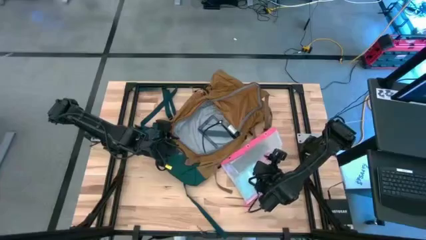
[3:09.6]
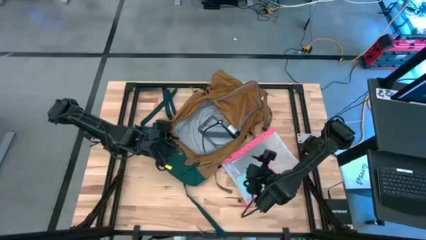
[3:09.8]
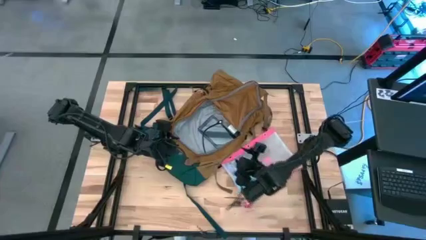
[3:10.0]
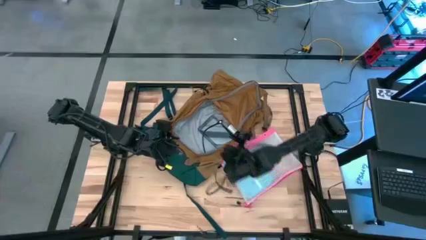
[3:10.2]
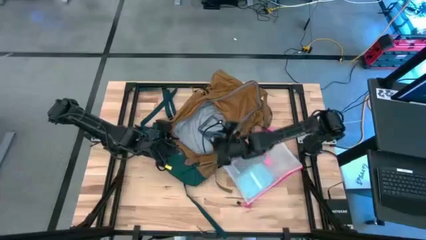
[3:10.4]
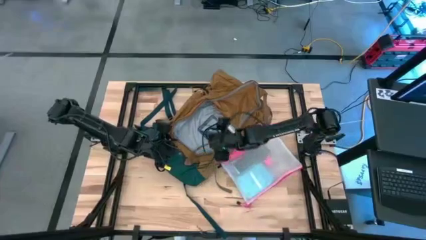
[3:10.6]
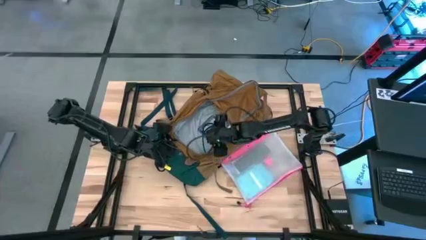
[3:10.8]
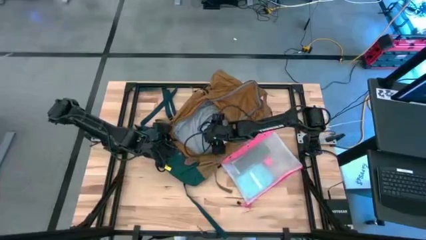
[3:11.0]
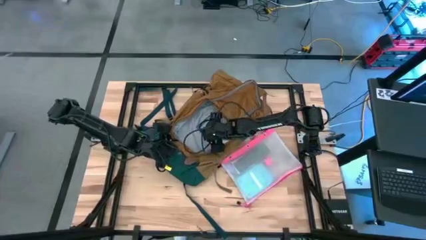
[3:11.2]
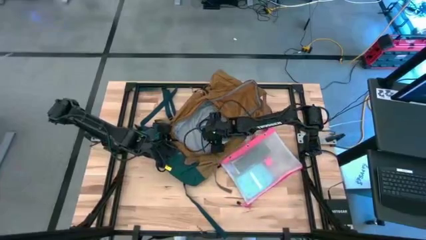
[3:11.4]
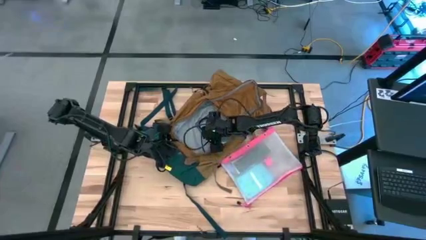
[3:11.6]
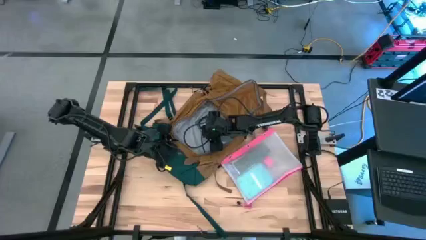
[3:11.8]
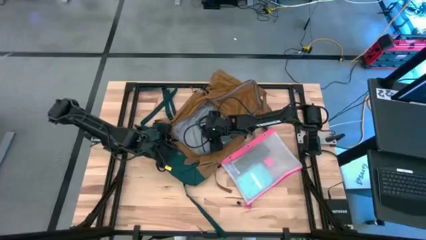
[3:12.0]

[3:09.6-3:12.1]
Task: Unpack backpack
Remove the black charger cable from the brown backpack

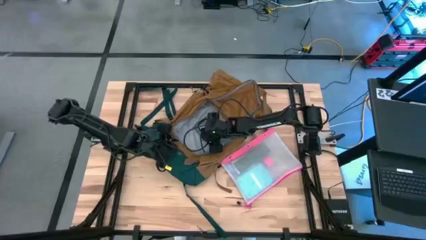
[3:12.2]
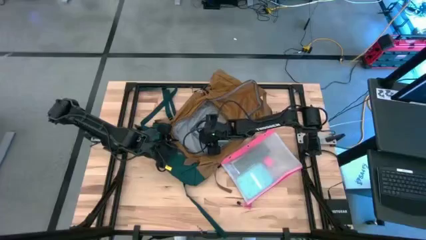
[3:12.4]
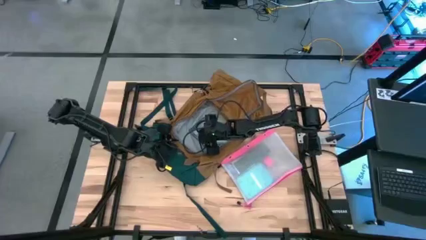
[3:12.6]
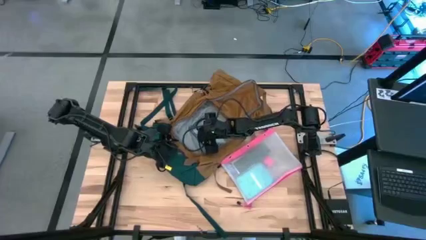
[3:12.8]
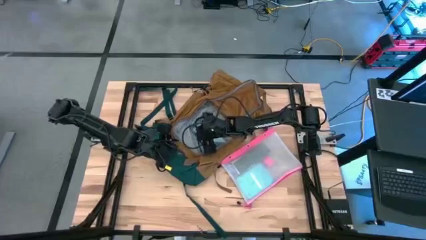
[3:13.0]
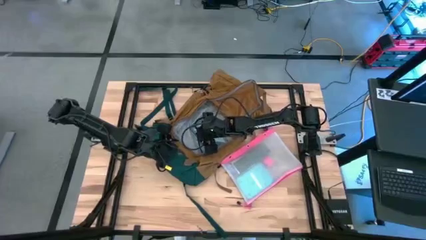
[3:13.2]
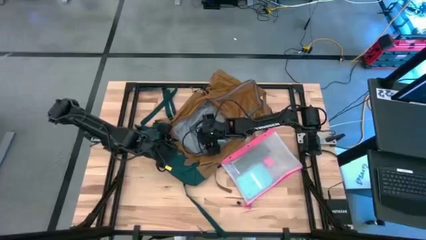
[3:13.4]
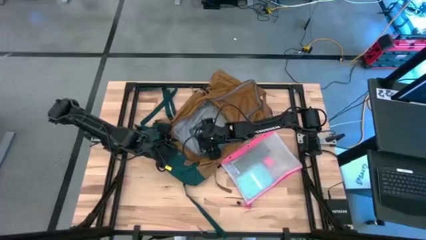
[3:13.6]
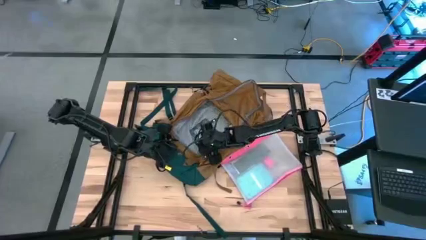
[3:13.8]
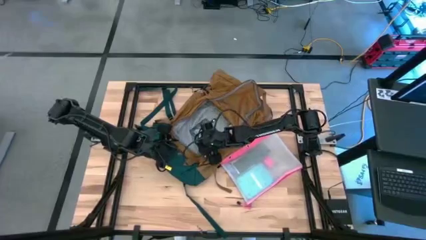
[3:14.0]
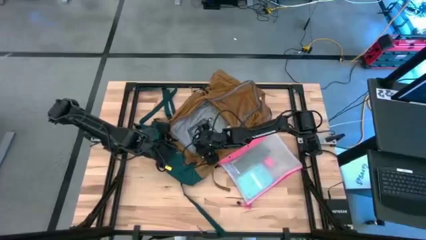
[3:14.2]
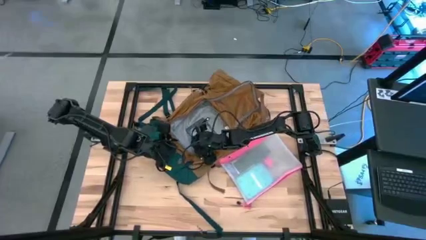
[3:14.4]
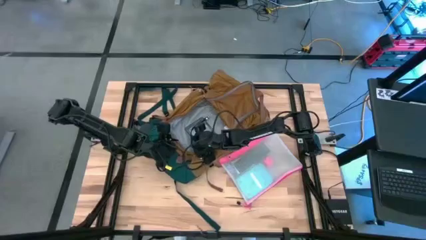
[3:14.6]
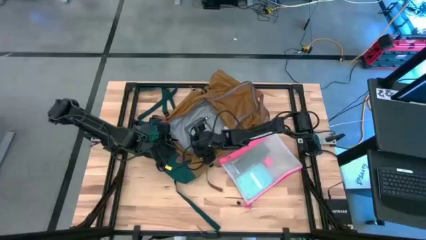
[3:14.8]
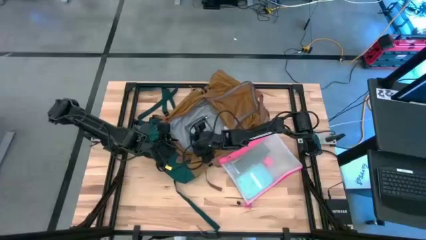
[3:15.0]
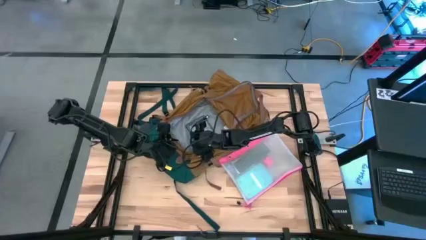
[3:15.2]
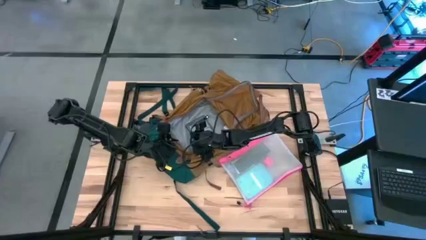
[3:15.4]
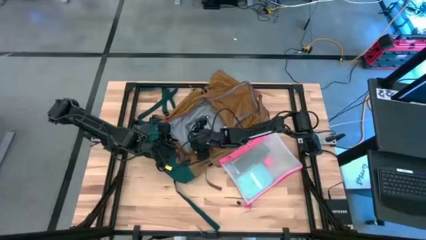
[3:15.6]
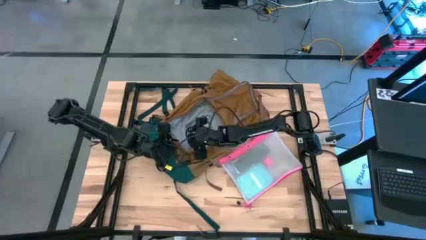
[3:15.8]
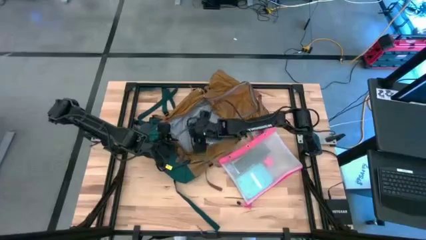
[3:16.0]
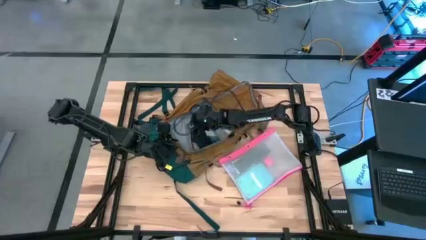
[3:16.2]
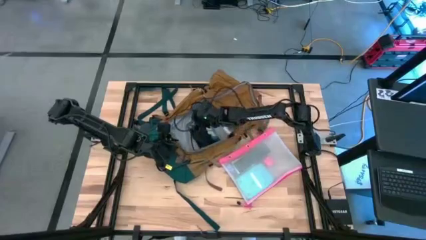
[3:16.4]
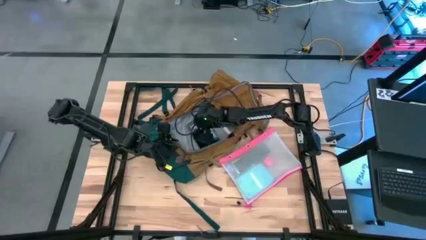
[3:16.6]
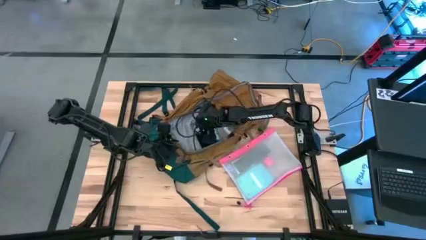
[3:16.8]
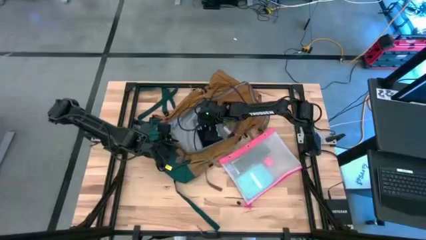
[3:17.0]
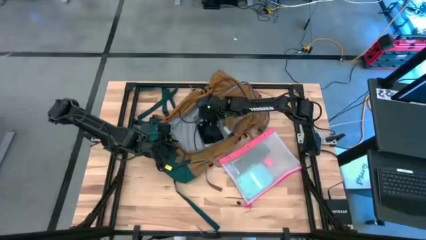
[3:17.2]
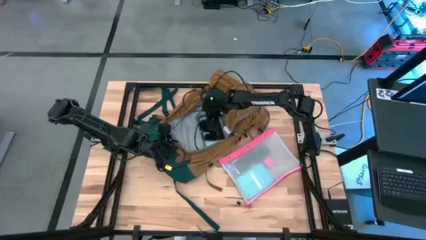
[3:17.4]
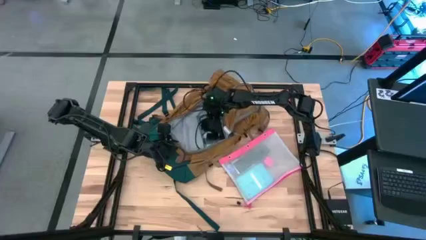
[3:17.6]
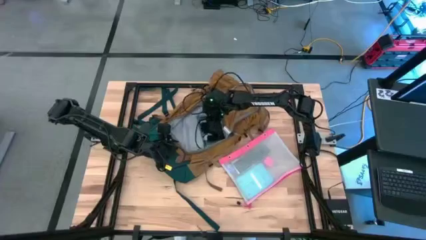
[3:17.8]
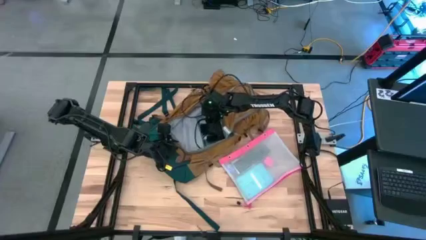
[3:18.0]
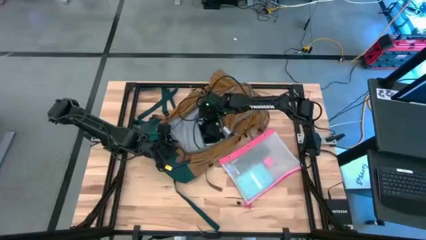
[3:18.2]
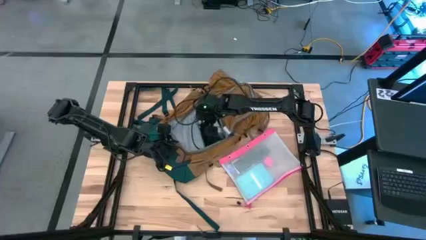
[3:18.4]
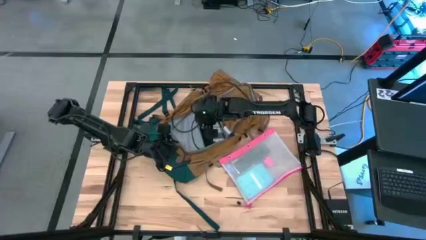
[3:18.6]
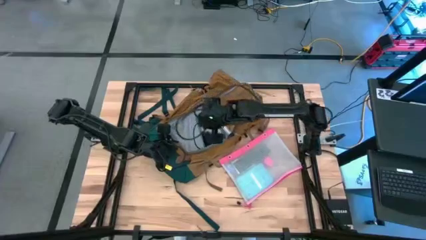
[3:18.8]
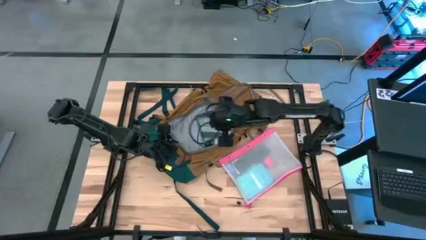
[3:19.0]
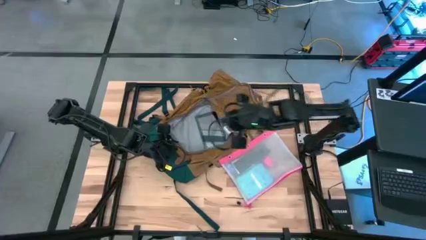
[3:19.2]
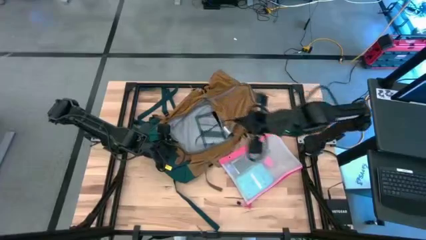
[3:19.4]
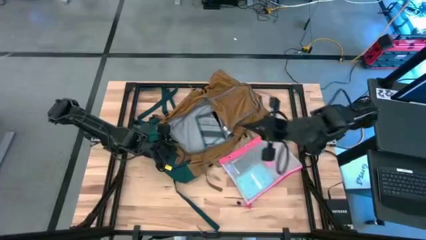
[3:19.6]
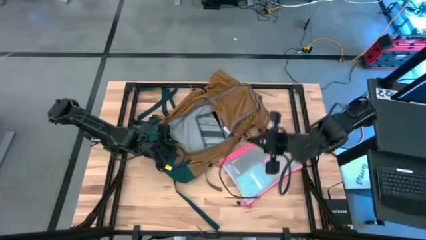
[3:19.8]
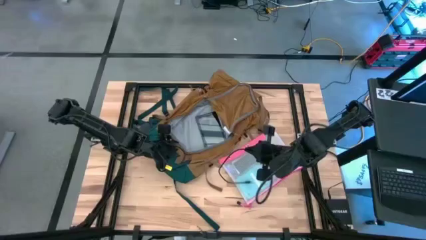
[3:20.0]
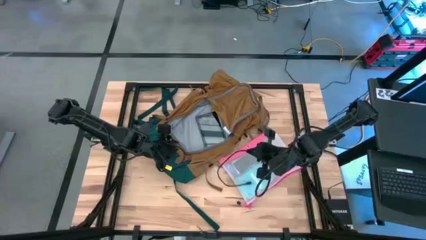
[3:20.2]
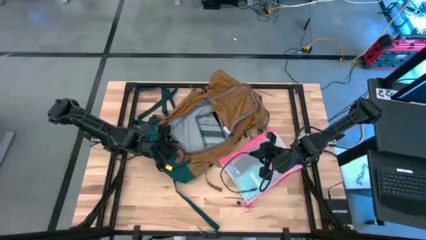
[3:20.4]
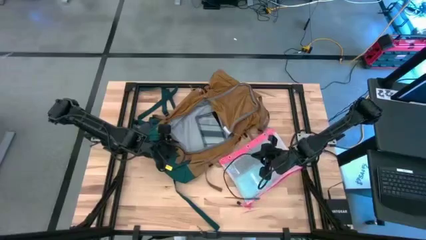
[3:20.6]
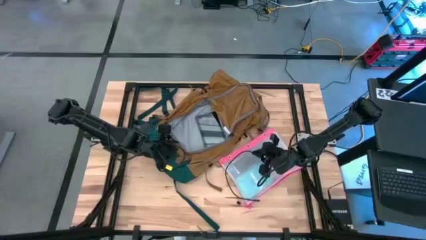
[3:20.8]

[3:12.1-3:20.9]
Remove the black charger cable from the brown backpack

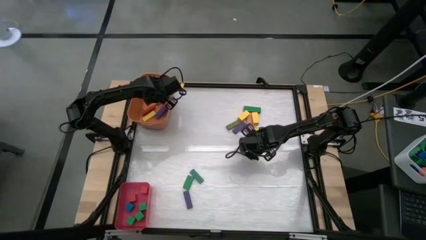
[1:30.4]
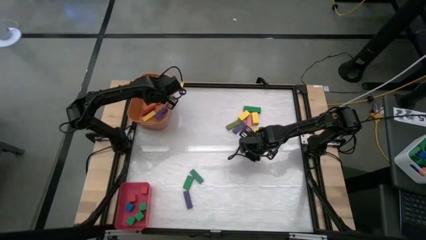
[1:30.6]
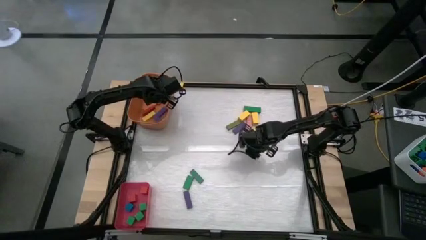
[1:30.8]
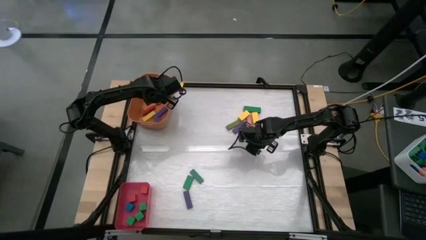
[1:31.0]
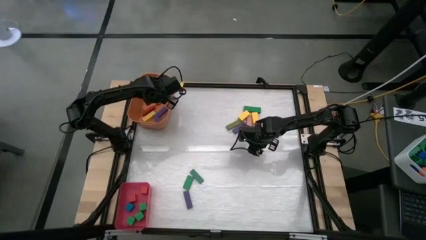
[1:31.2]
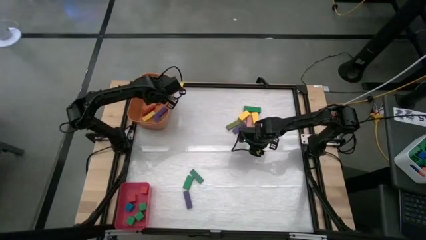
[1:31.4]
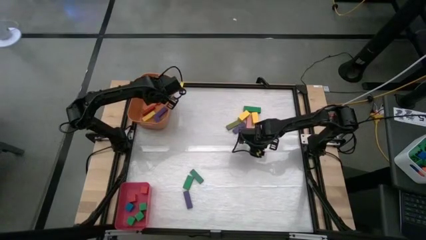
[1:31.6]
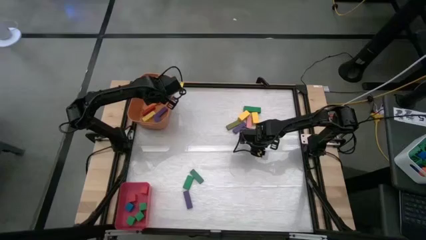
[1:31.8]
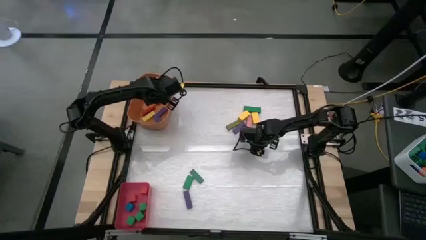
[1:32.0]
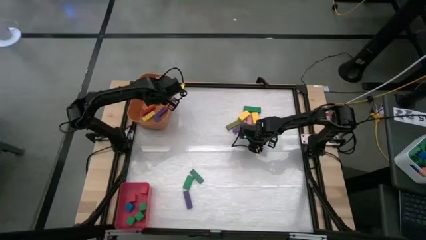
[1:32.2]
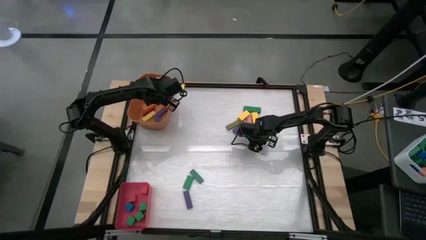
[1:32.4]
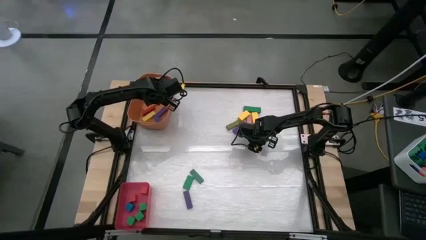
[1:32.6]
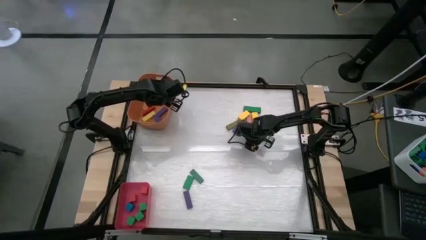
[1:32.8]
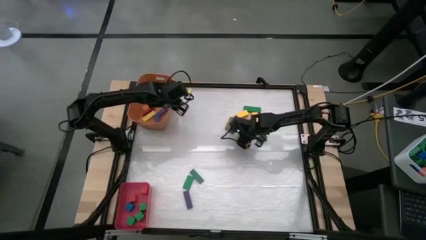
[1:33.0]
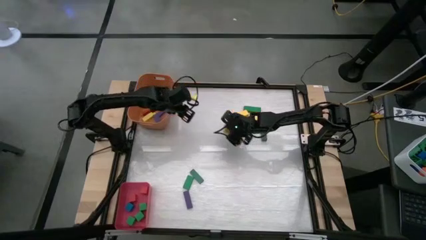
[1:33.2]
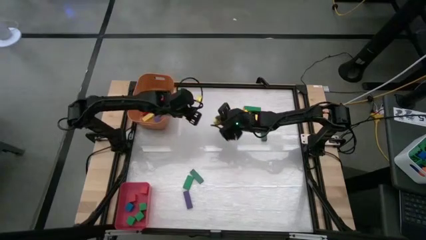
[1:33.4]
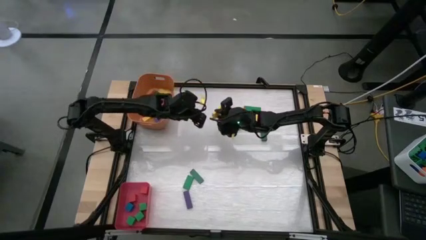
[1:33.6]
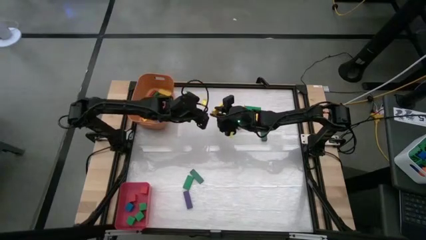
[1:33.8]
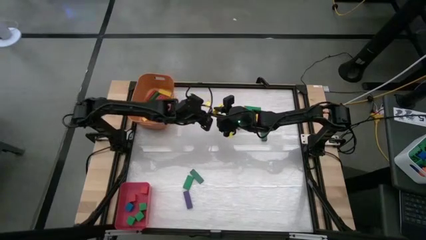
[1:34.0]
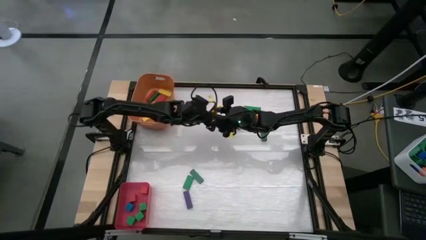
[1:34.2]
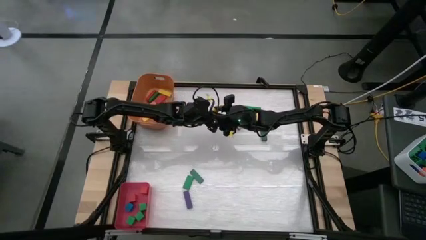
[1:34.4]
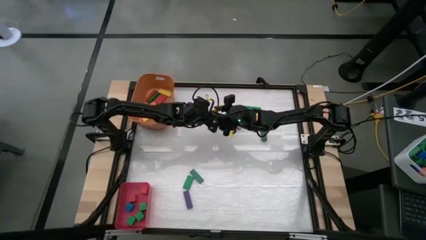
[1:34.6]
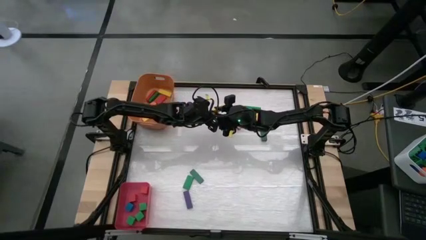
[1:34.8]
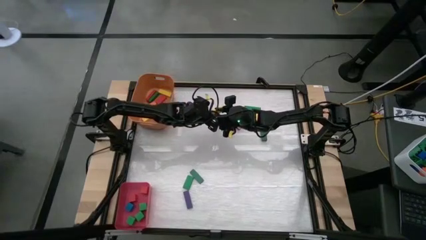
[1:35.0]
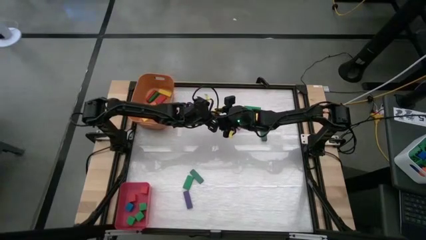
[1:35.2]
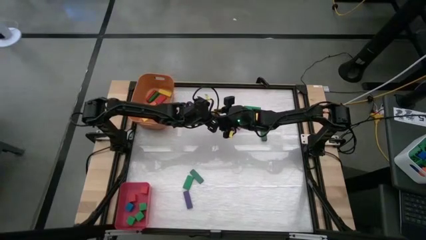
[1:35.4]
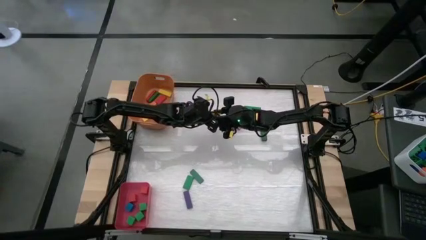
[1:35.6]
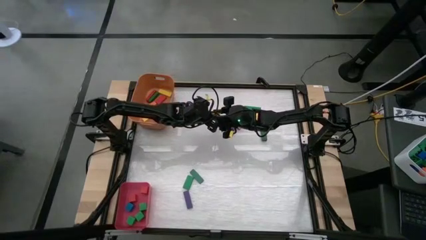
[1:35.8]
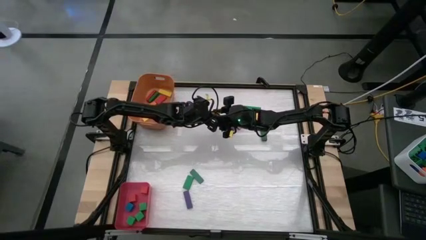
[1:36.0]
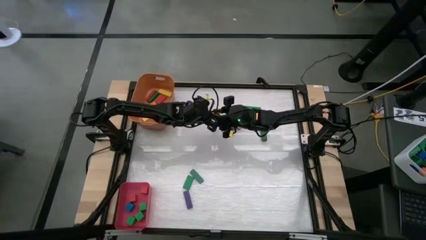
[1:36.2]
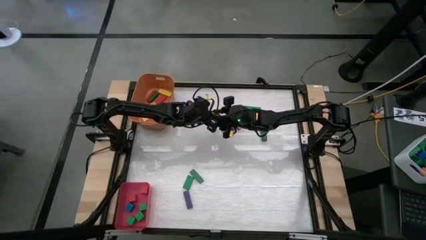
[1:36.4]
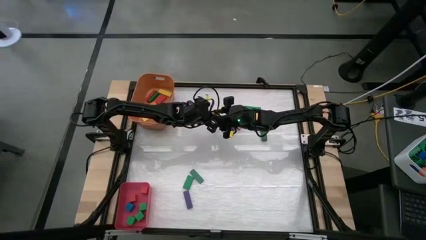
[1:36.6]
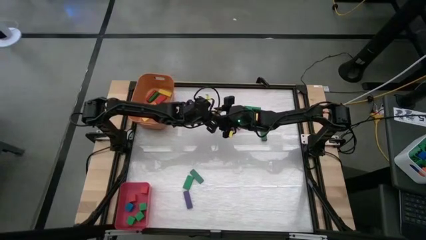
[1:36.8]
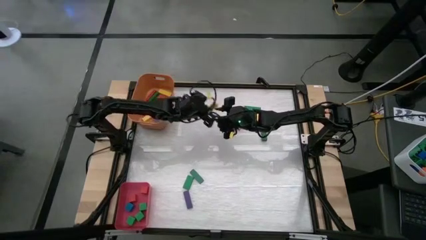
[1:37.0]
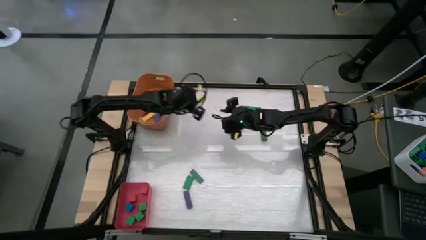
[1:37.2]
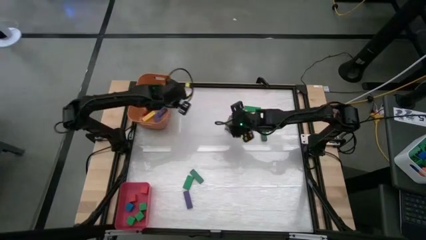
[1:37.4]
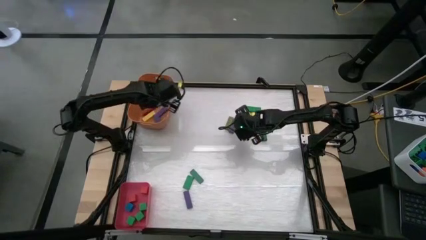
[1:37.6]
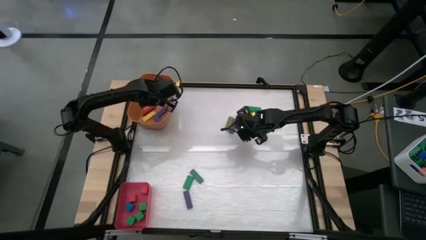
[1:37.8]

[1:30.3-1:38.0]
Task: Sort blocks by size
Put the big yellow block into the orange bin
